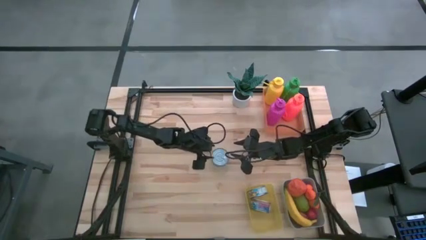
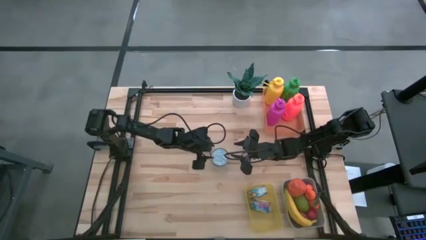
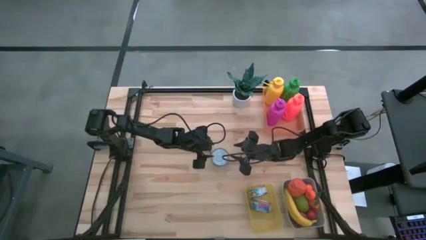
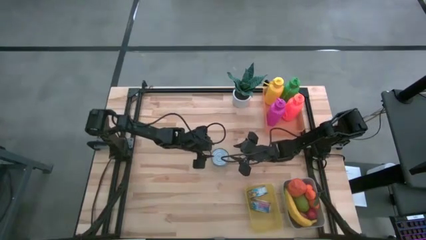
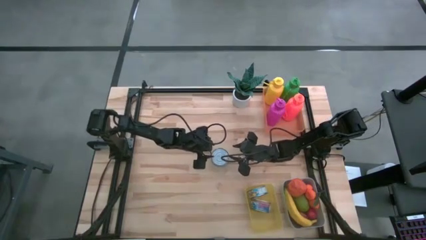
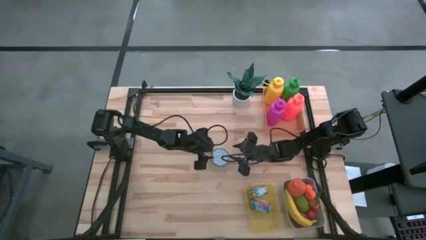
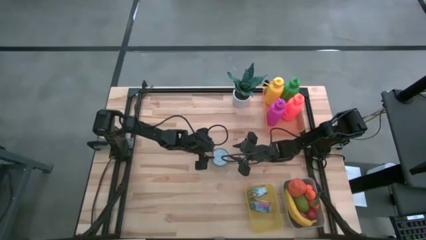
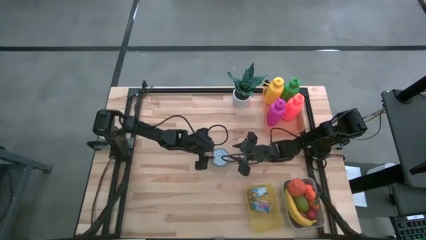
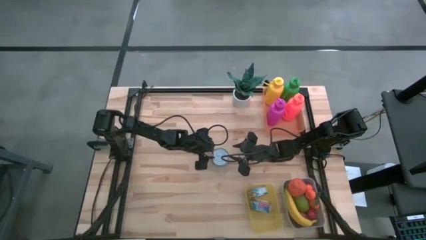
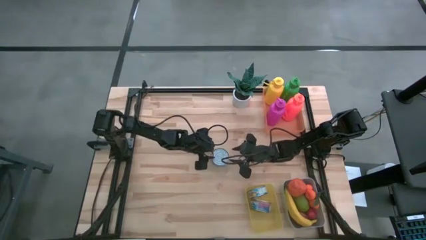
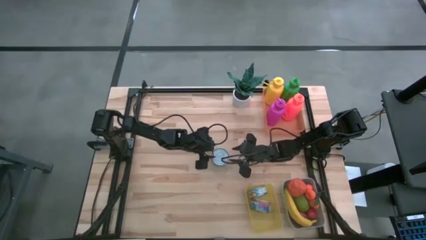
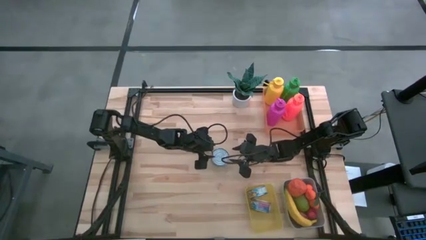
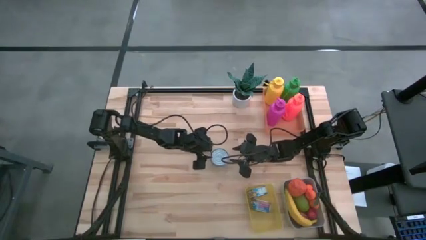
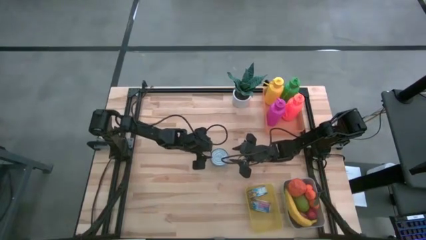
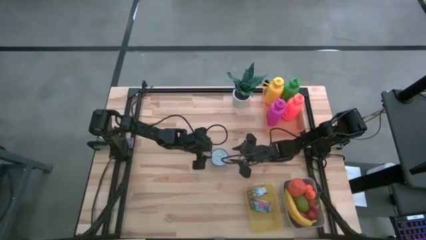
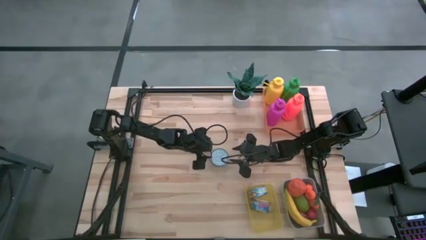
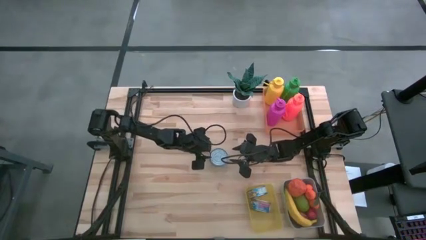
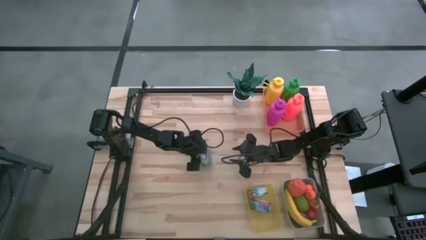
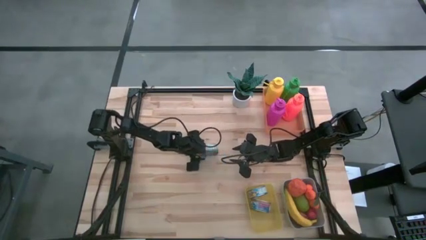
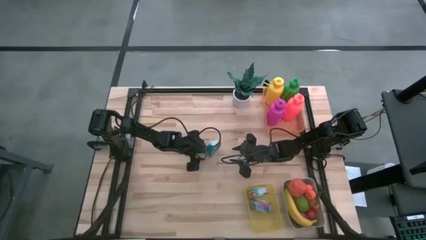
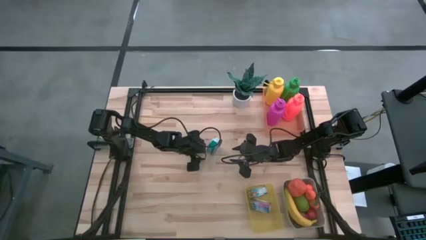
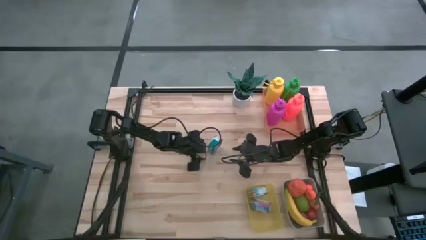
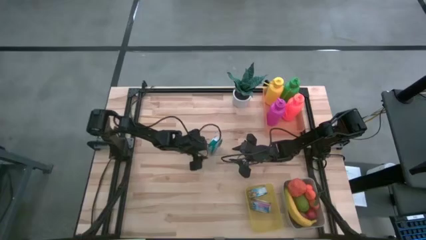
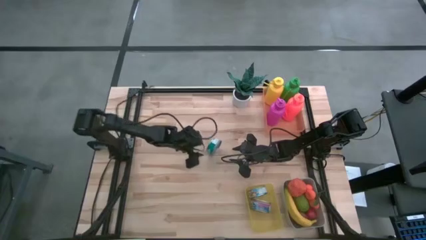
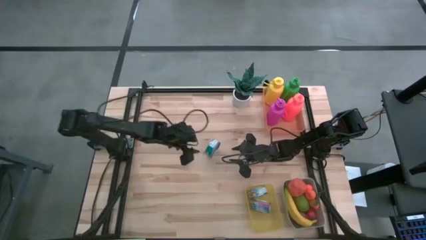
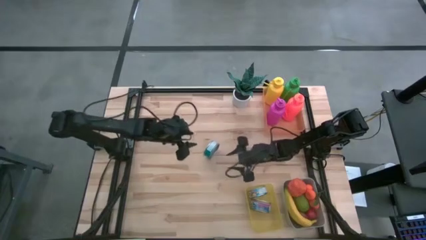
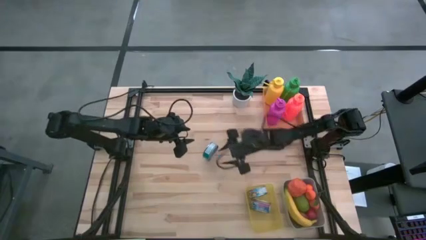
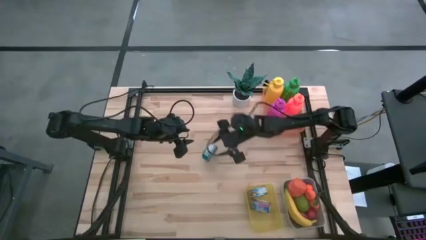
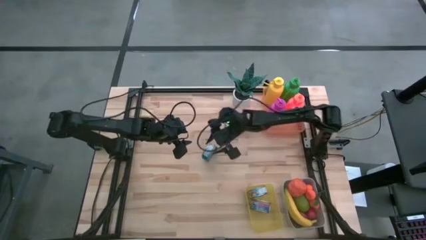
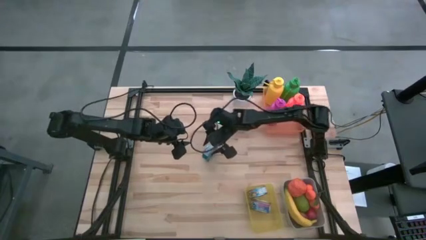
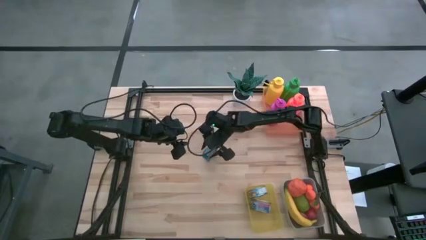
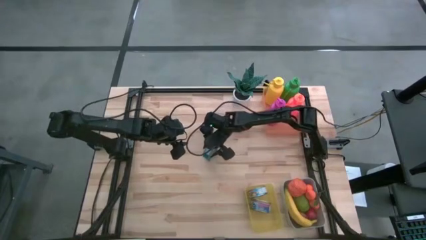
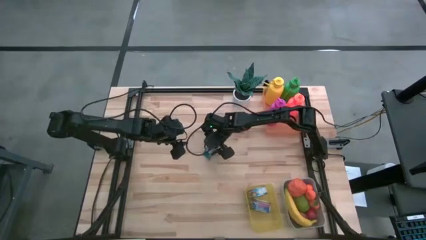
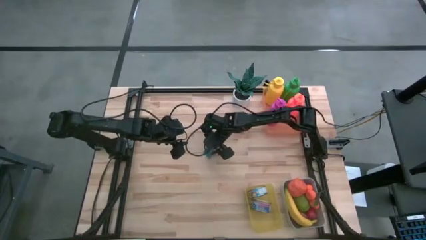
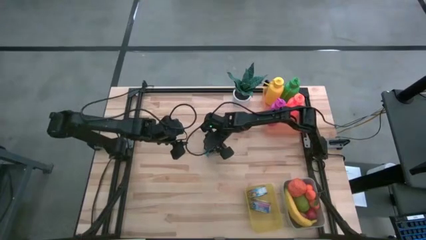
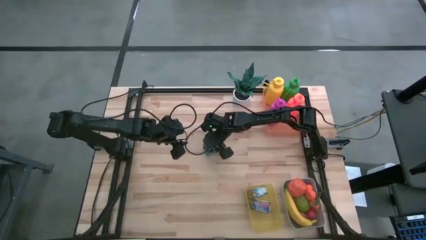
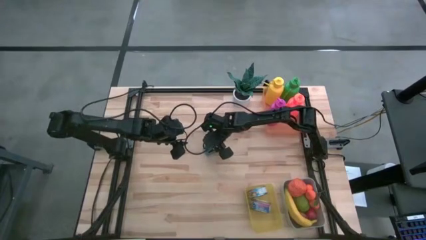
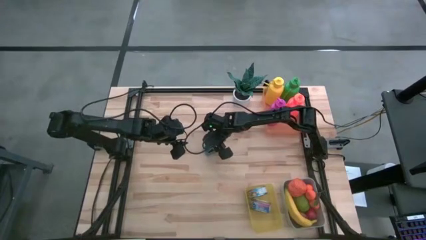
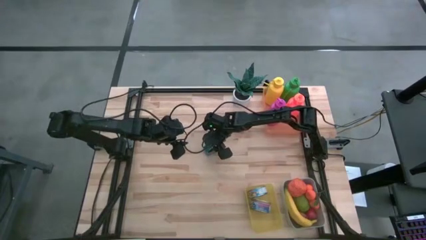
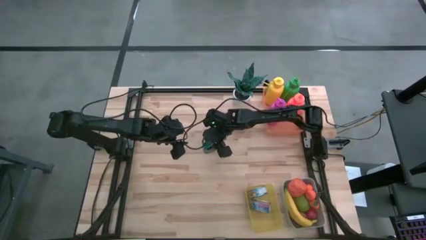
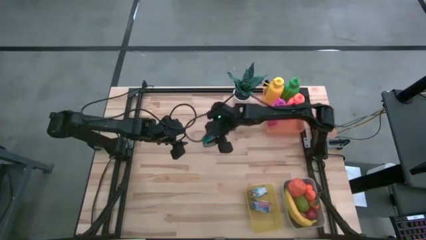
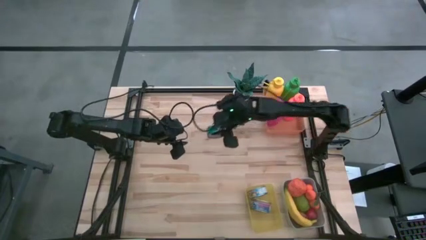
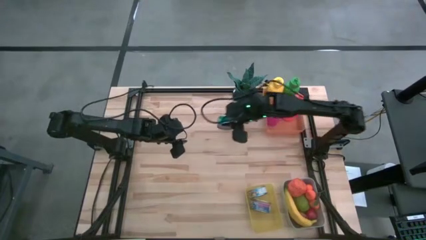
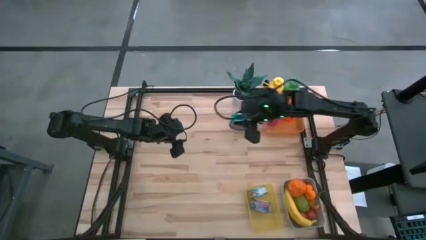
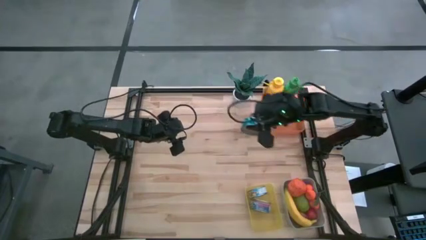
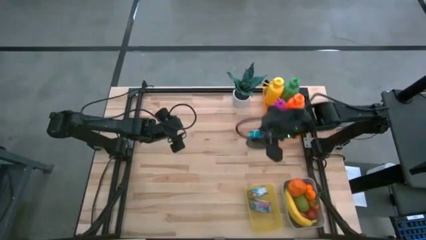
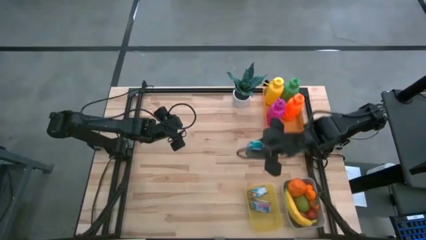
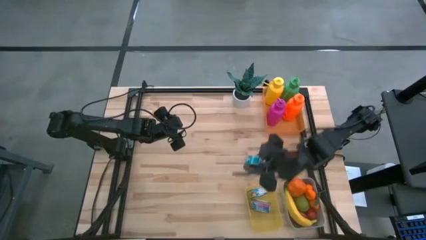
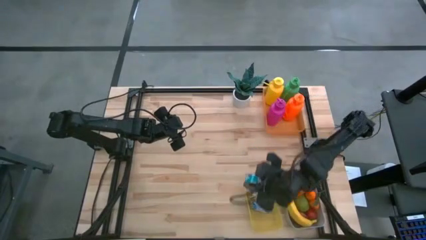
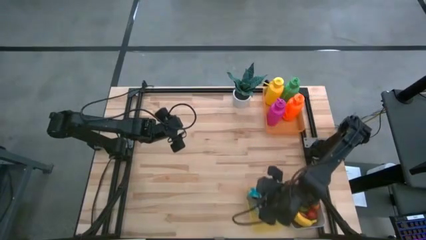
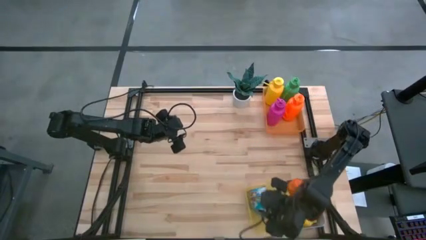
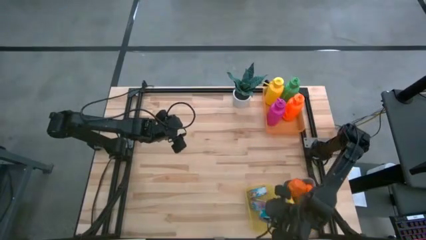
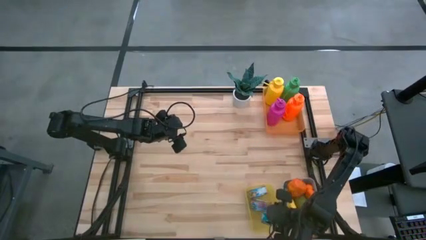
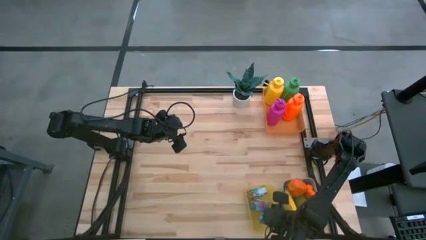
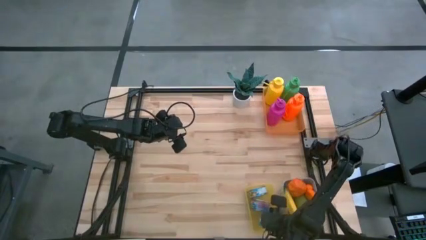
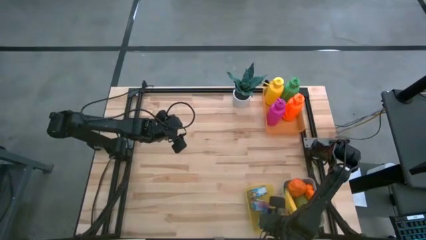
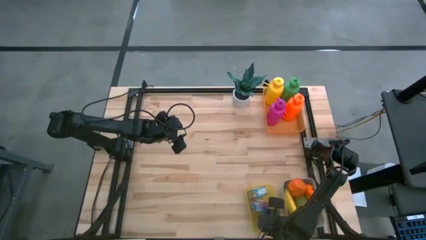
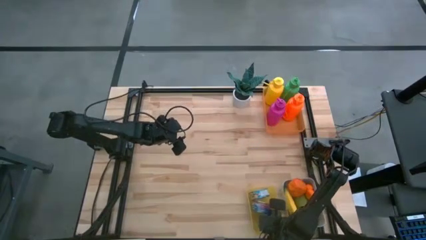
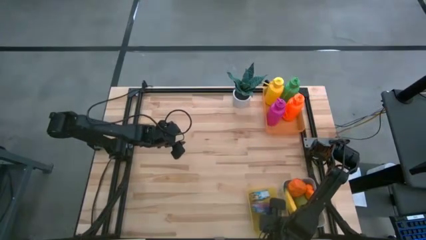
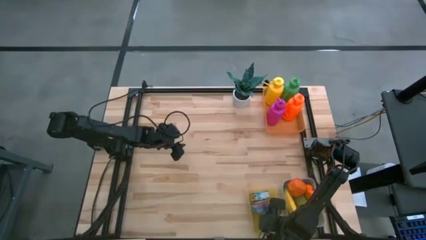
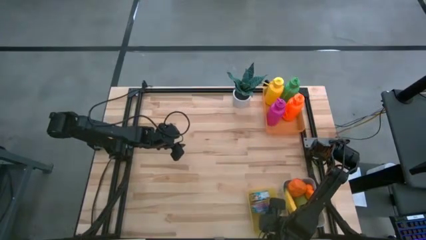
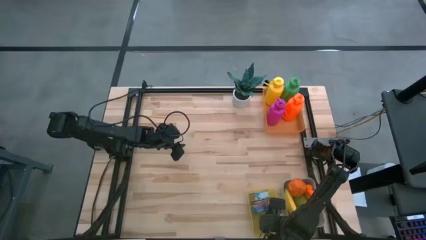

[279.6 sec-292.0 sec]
Task: Pick & Place Food Item
Put the light blue tuna can into the yellow bin
